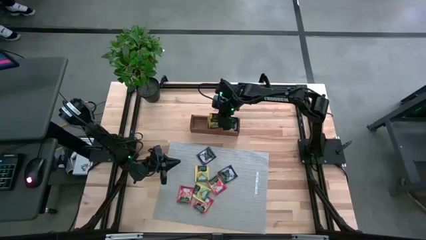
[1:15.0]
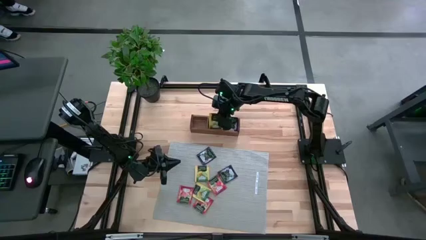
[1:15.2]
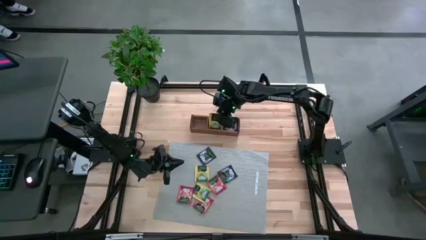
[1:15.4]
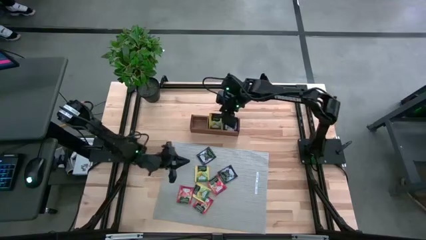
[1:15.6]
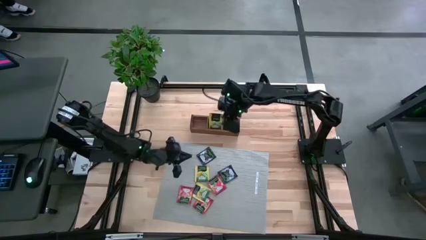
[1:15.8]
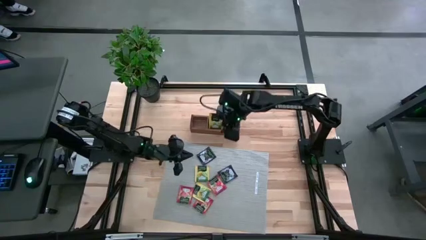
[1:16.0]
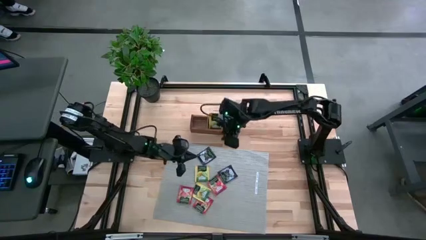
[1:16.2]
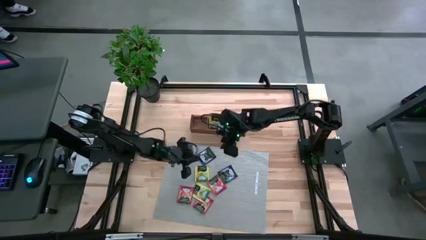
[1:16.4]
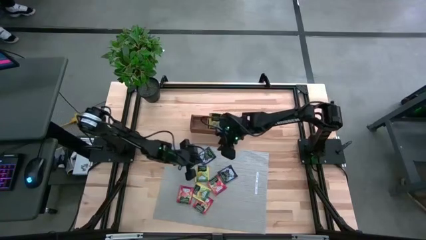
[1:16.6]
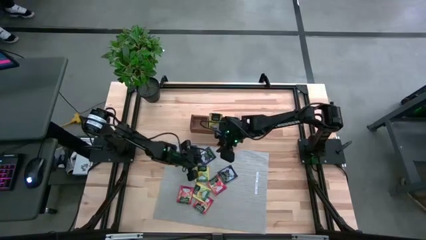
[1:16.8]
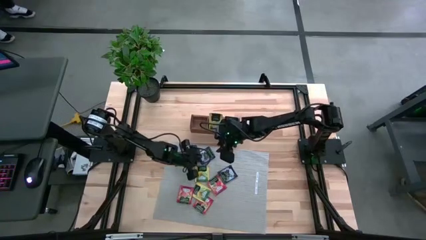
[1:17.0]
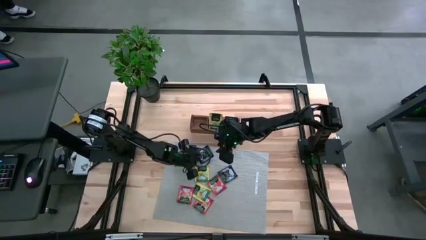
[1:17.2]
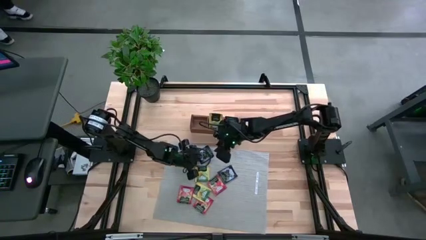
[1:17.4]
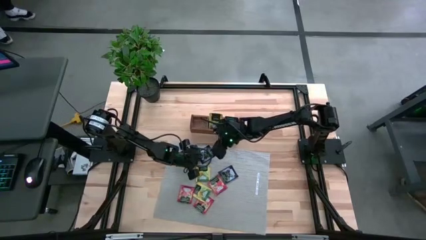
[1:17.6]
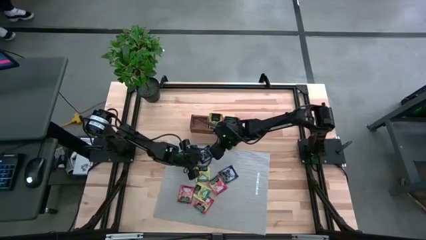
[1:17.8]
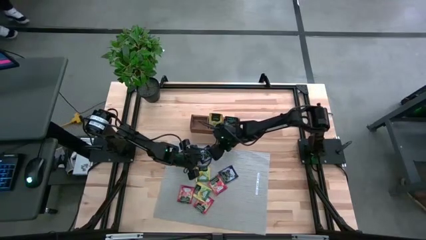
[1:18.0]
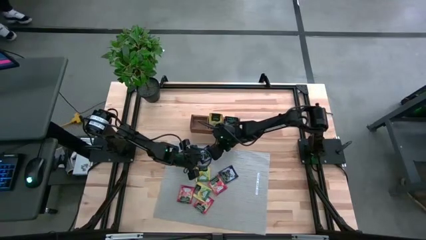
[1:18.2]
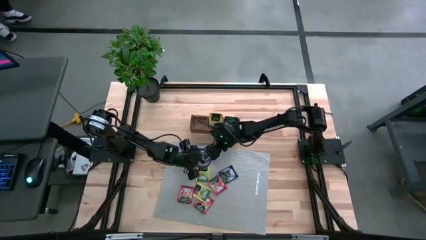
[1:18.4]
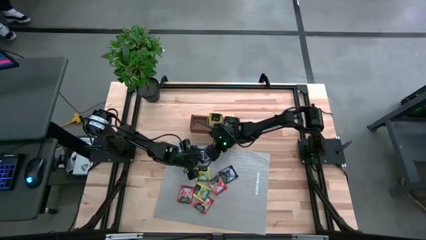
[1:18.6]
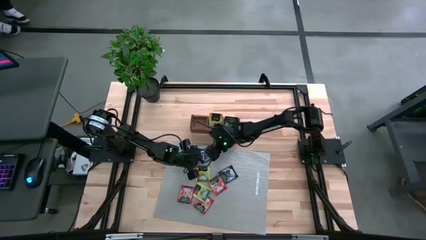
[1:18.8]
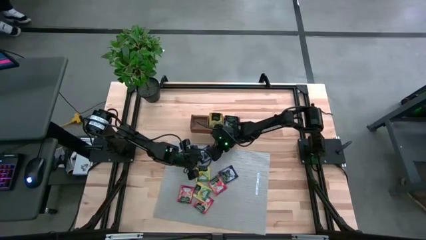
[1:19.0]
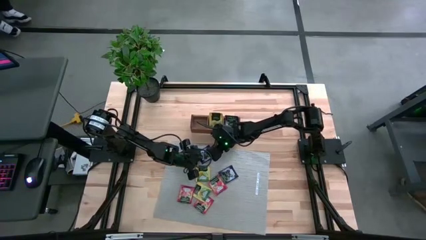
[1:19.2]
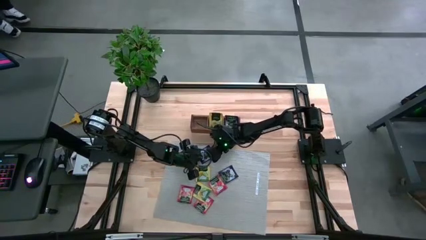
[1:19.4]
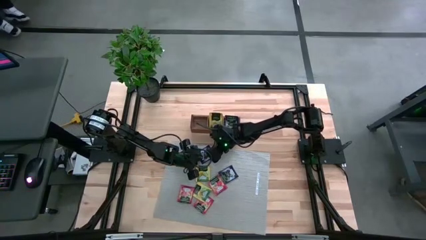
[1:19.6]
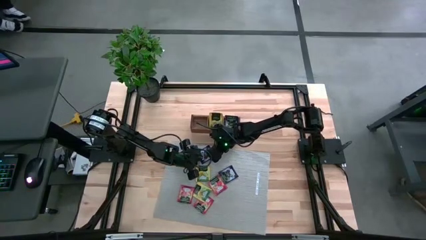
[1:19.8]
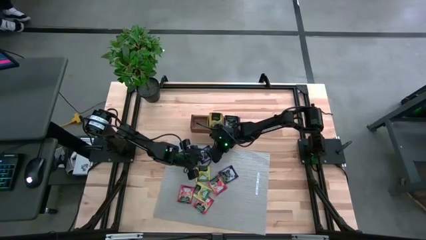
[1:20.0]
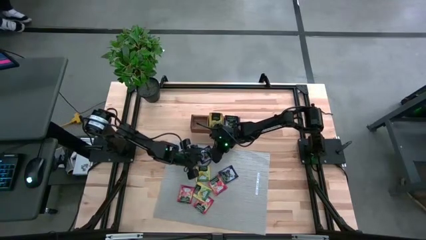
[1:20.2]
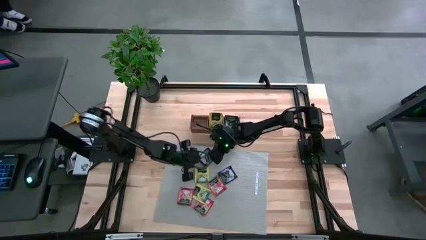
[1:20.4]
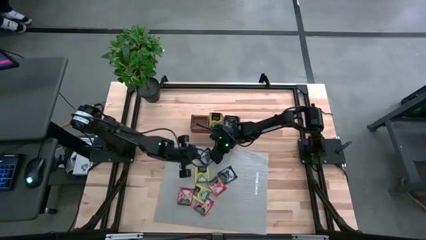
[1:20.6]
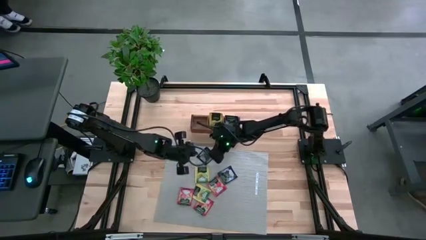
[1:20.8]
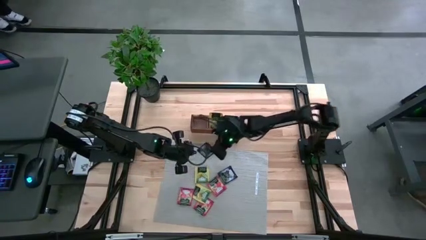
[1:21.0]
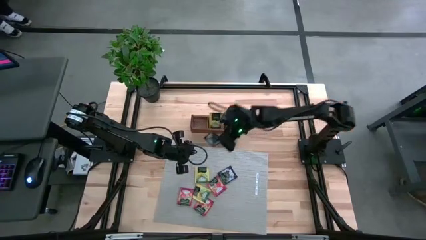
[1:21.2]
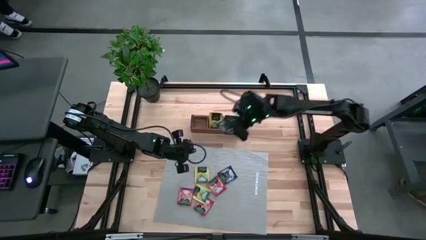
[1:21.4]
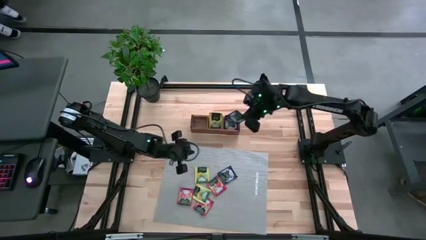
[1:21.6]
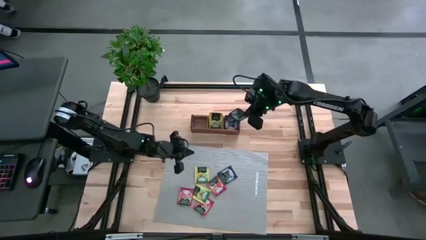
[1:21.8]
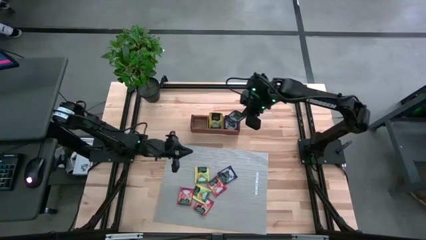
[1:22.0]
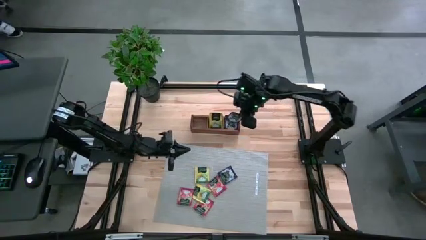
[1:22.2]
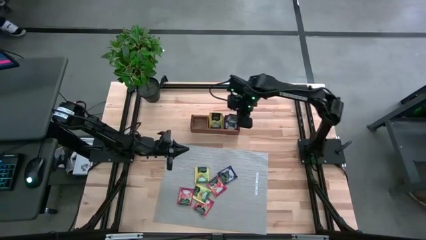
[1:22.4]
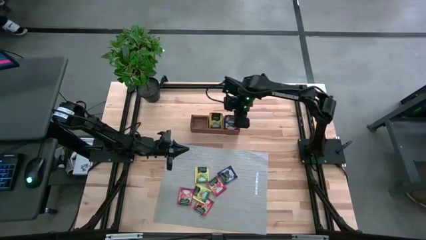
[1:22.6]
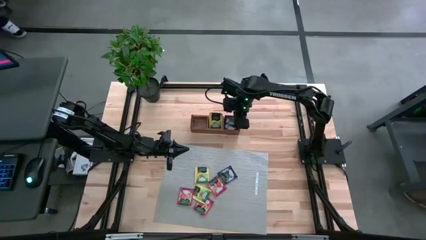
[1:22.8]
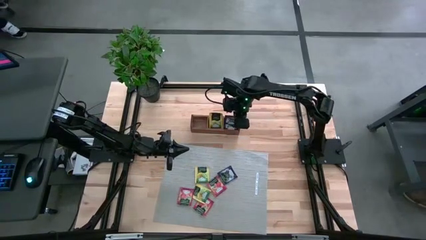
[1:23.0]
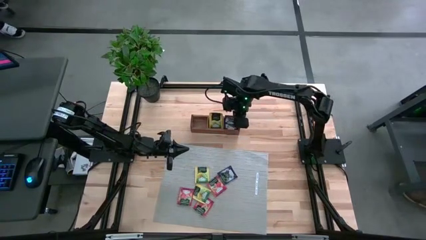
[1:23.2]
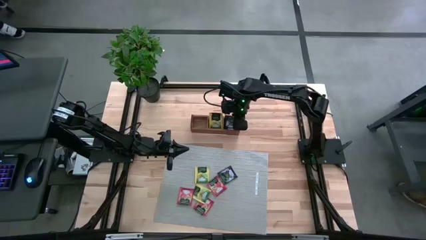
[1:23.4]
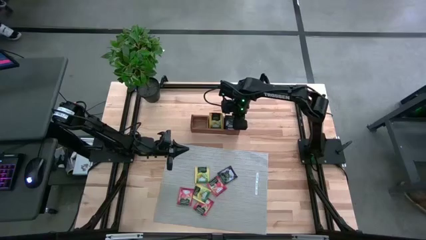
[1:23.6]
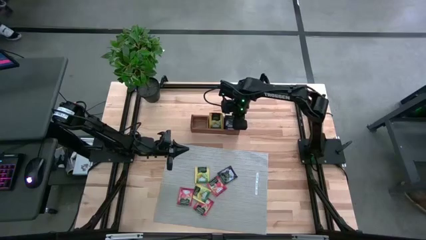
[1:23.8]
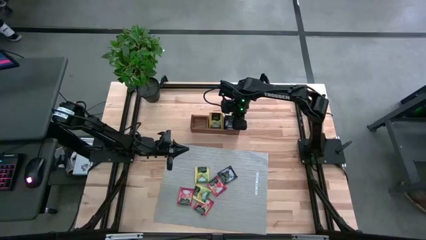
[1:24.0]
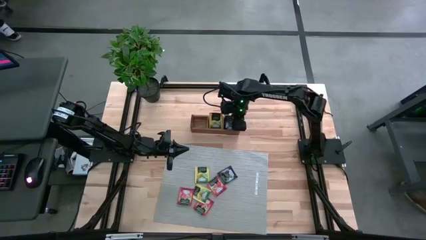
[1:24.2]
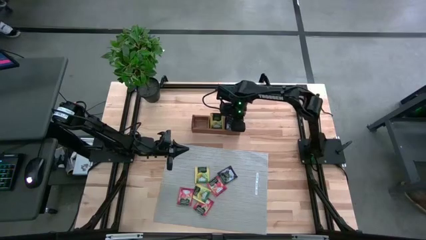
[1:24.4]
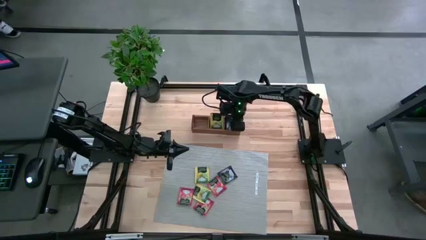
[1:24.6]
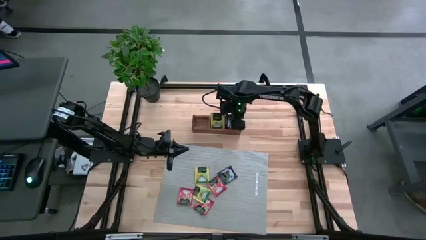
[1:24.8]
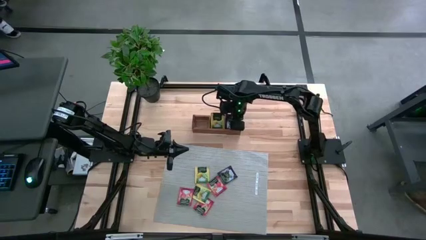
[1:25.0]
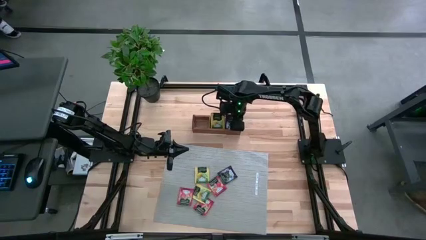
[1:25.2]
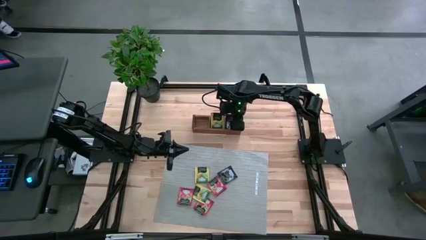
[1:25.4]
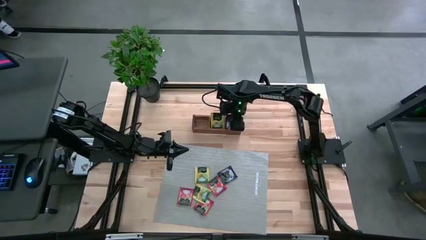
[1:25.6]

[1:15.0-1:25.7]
Task: Pick & Place Tea
Put the violet tea bag into the right section of the wooden organizer

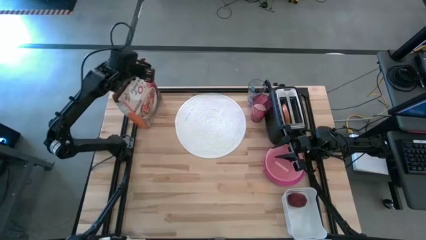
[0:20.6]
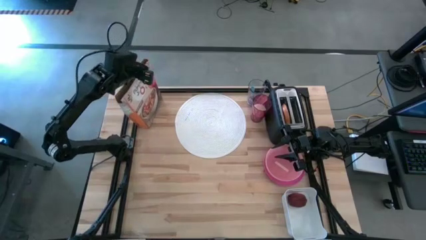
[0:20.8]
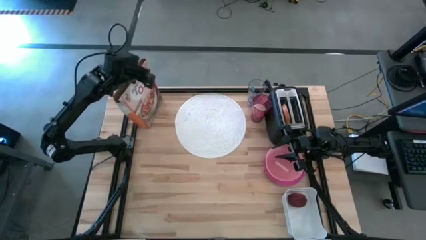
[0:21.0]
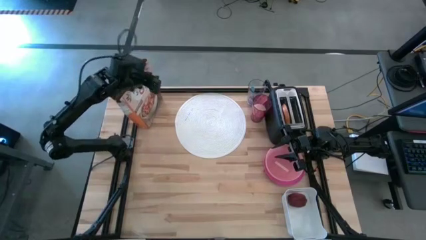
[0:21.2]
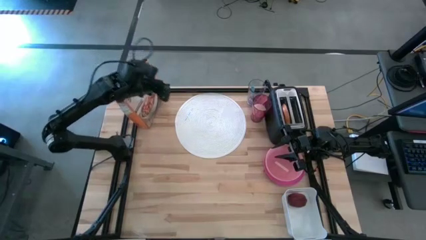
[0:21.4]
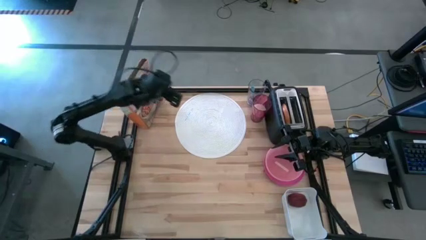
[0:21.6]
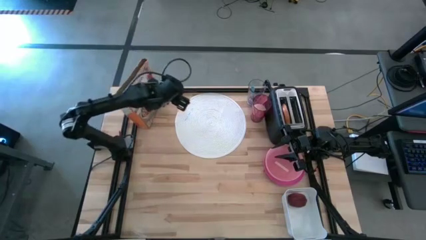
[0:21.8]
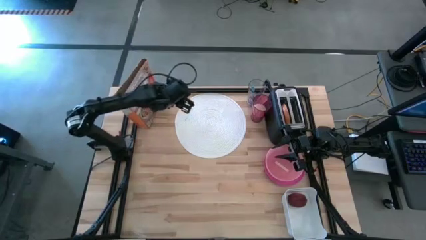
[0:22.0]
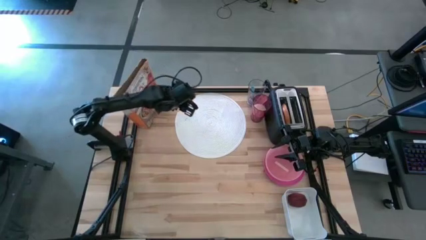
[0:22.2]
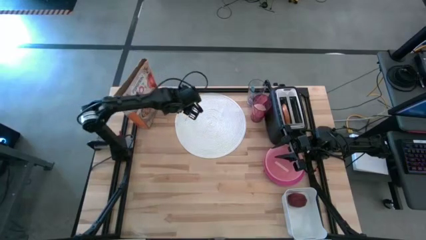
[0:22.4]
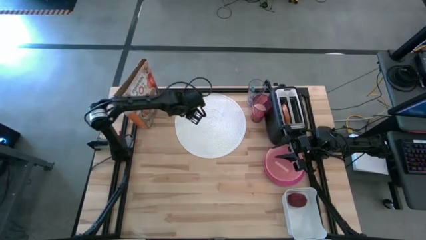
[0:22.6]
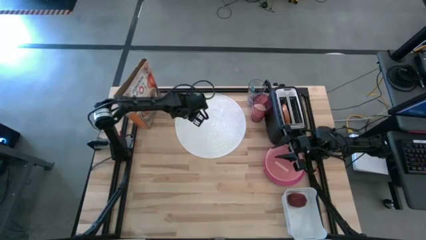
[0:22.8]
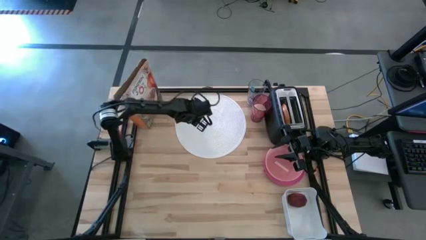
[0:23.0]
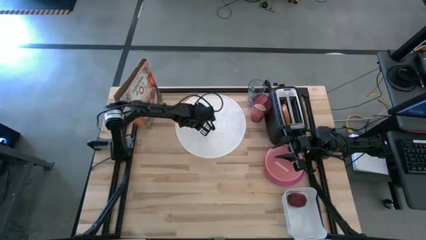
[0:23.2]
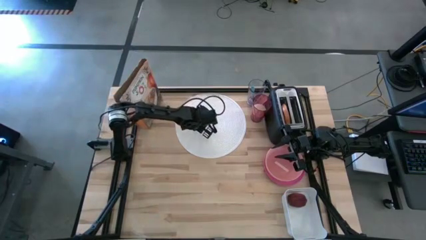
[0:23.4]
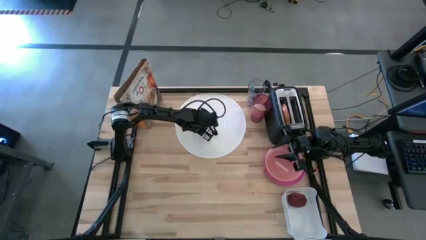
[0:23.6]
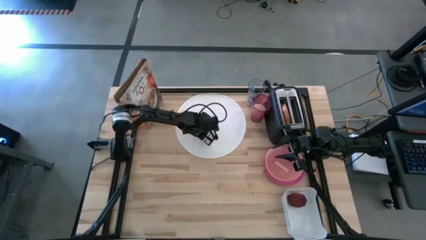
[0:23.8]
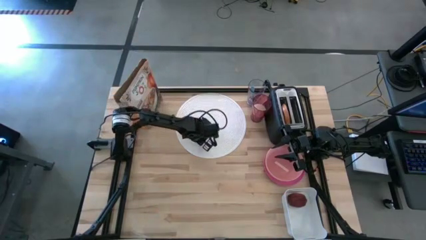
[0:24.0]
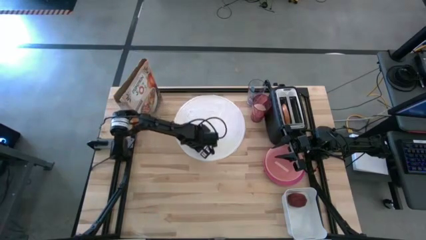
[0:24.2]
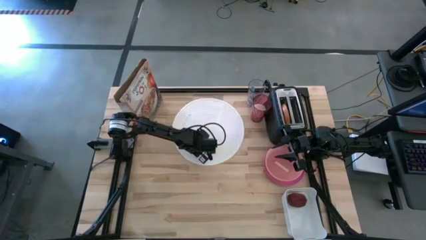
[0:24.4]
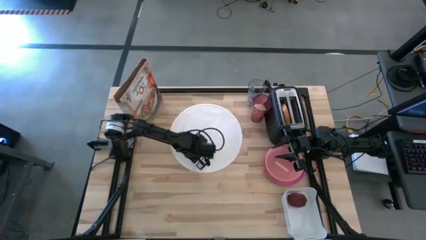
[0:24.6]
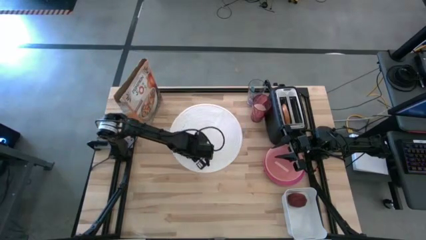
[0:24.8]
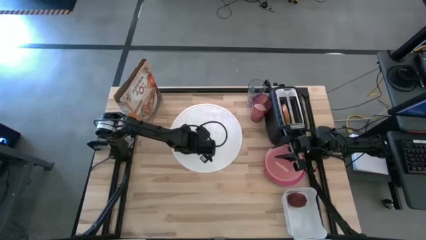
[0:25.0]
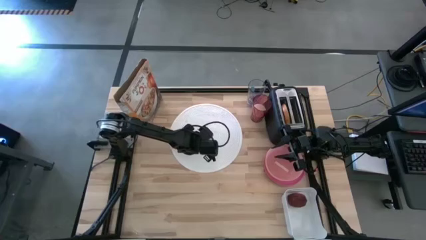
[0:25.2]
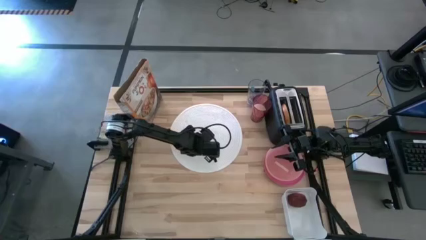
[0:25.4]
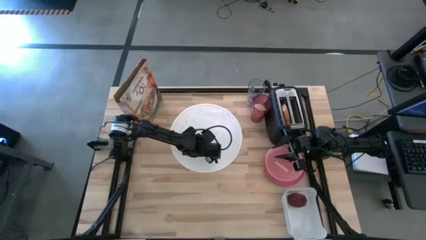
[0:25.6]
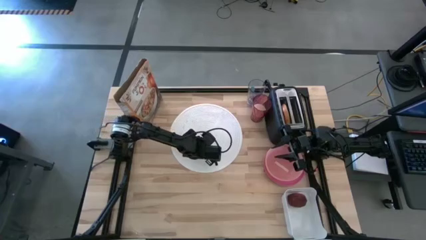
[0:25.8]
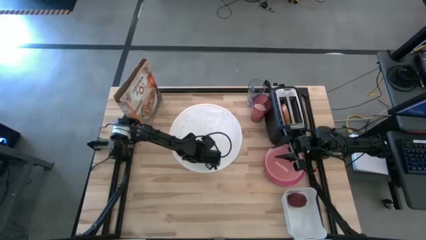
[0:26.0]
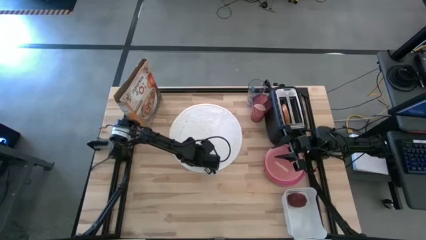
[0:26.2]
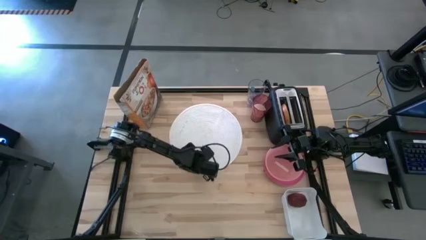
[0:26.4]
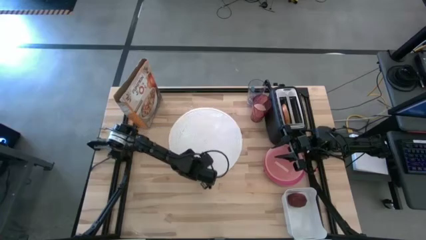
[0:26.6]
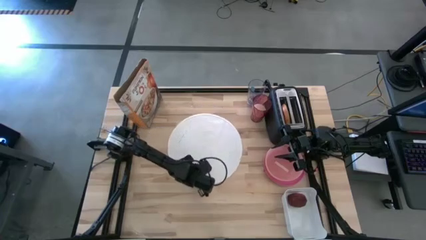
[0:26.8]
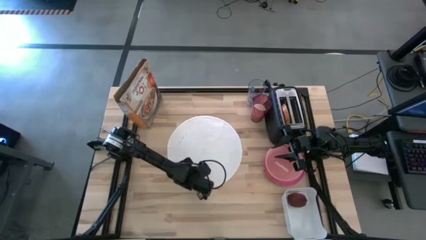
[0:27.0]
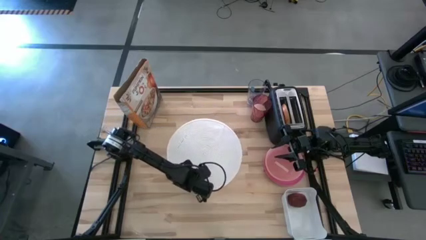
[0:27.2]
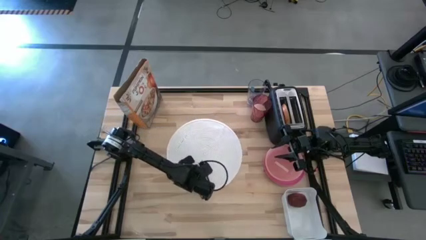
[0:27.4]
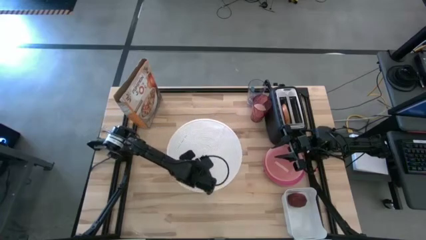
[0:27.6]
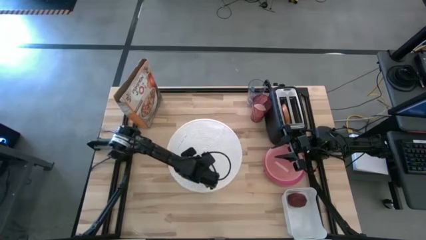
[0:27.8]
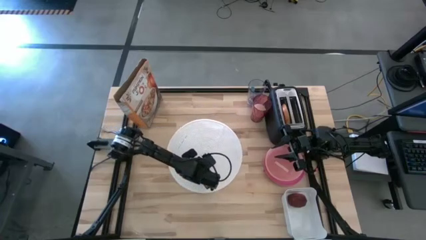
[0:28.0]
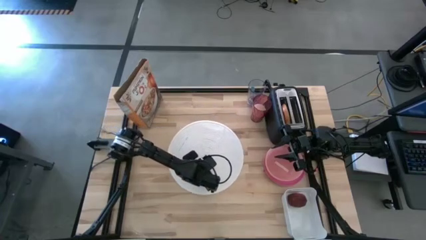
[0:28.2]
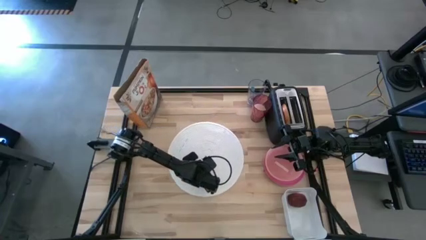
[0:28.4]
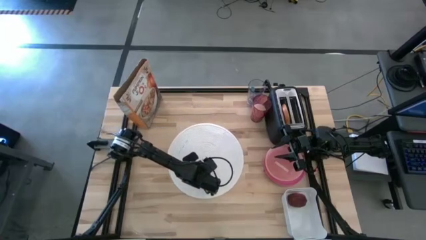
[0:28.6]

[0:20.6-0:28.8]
Task: Arrange a breakfast setting
Adjust the white placemat
